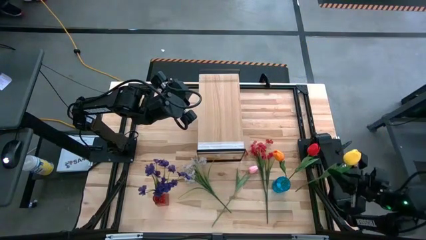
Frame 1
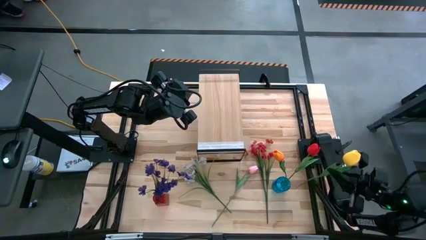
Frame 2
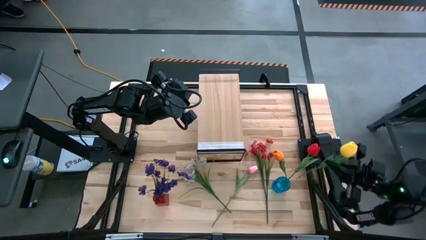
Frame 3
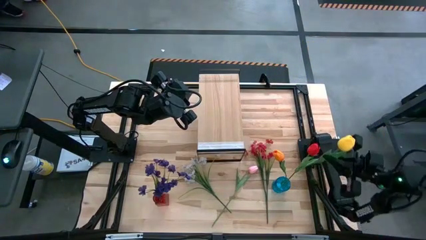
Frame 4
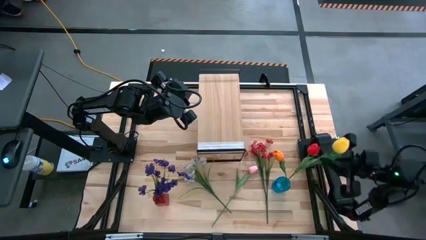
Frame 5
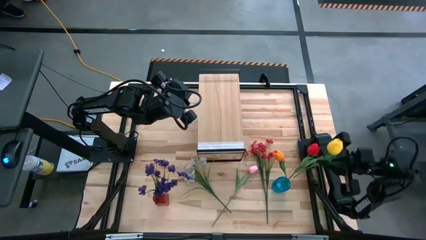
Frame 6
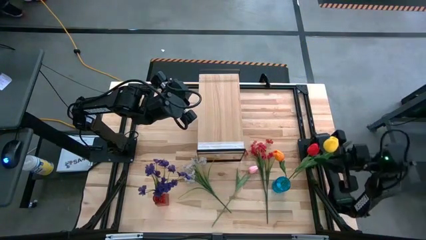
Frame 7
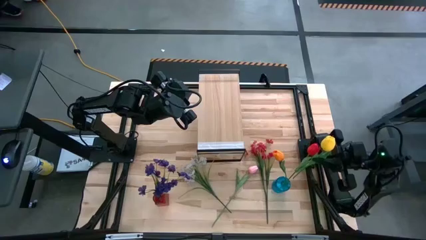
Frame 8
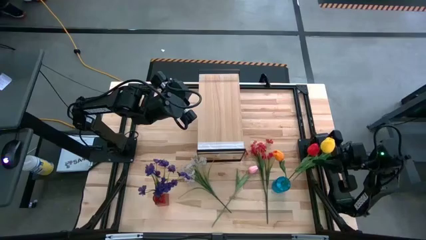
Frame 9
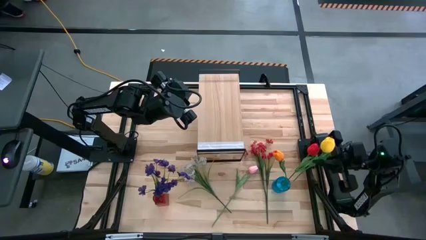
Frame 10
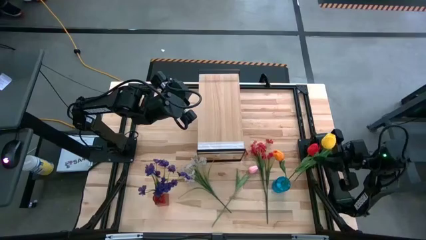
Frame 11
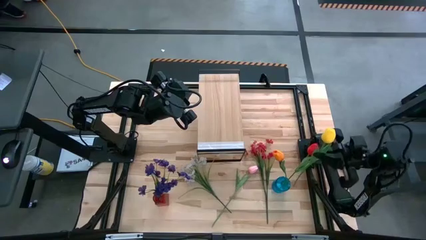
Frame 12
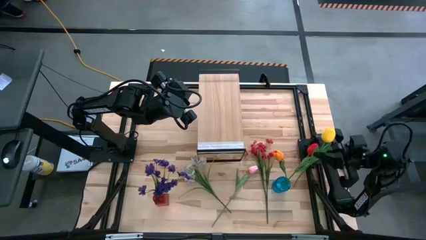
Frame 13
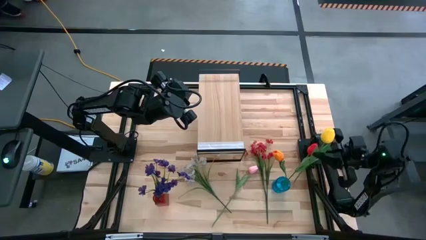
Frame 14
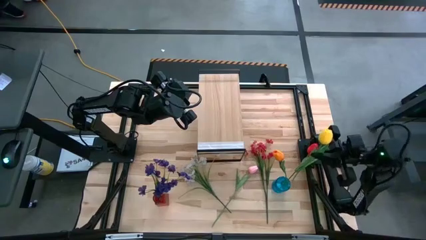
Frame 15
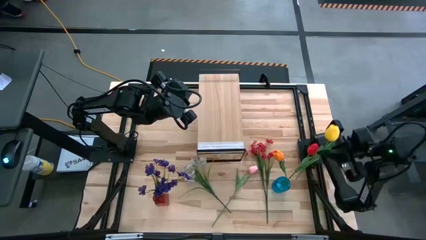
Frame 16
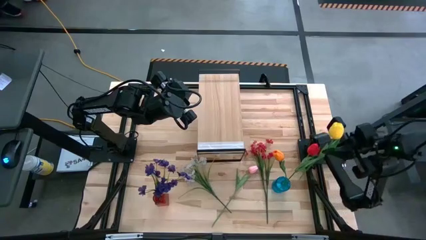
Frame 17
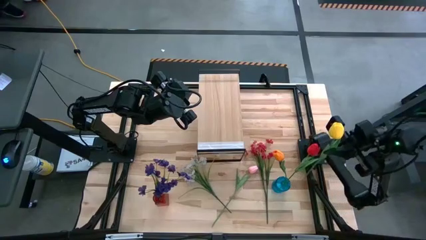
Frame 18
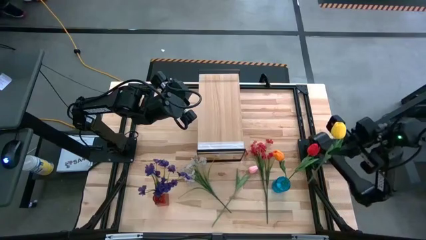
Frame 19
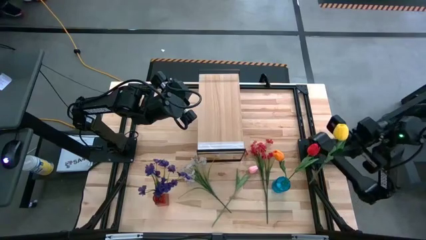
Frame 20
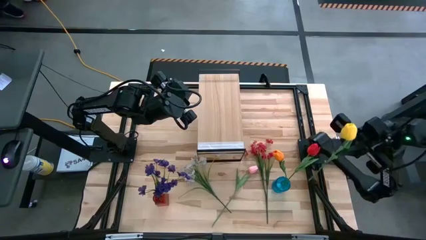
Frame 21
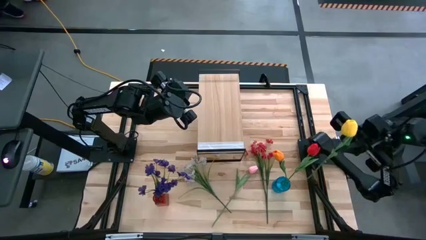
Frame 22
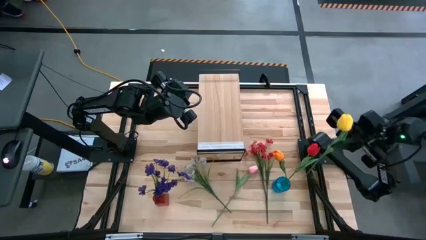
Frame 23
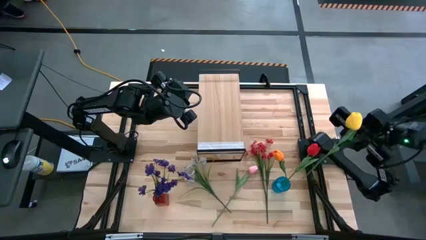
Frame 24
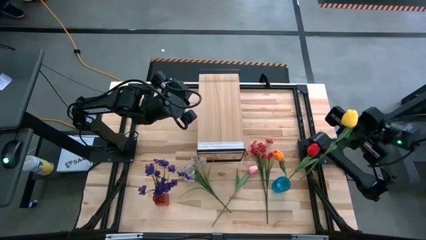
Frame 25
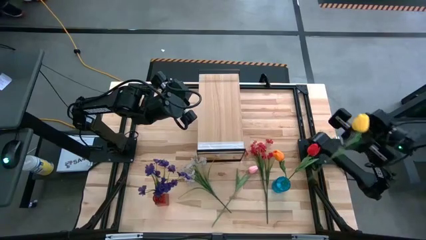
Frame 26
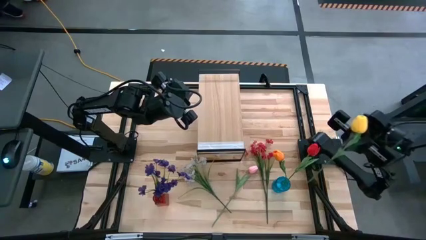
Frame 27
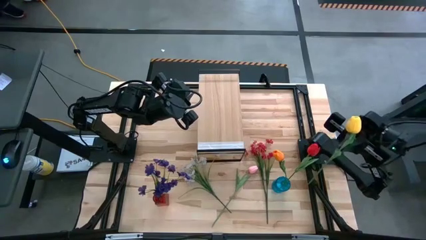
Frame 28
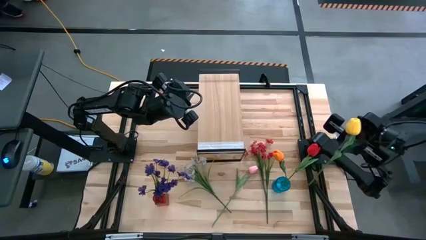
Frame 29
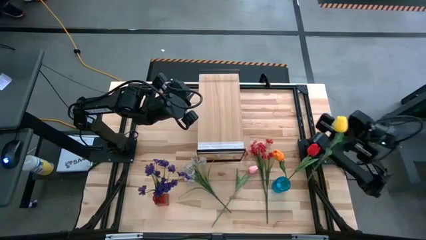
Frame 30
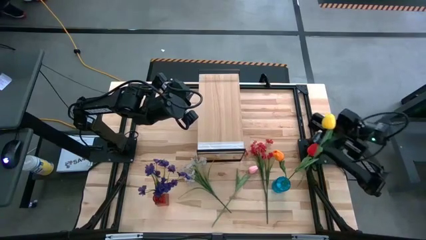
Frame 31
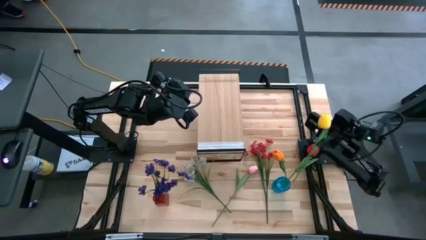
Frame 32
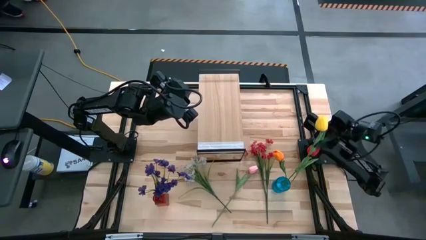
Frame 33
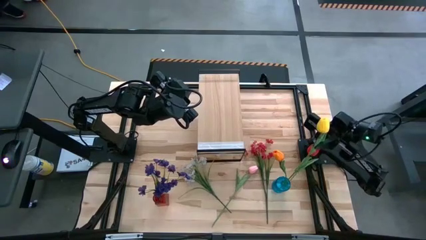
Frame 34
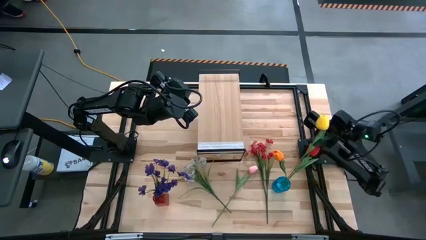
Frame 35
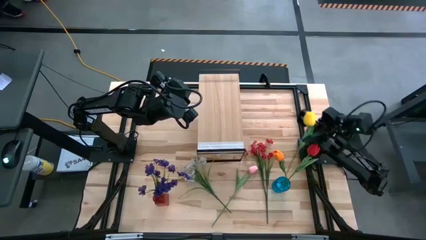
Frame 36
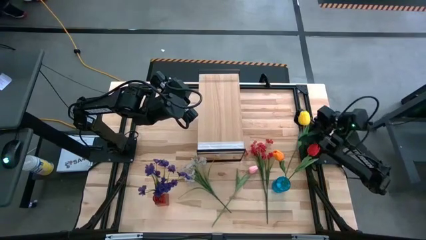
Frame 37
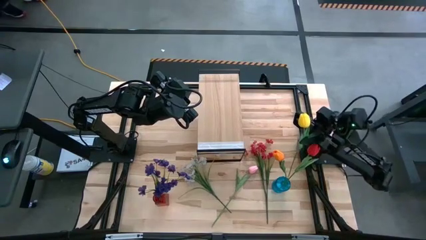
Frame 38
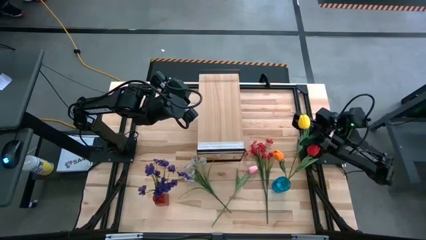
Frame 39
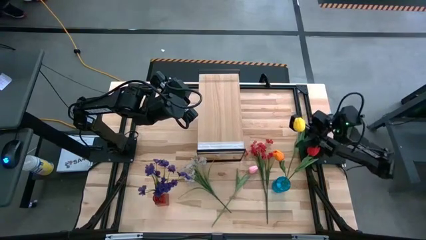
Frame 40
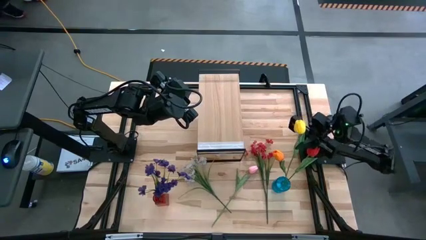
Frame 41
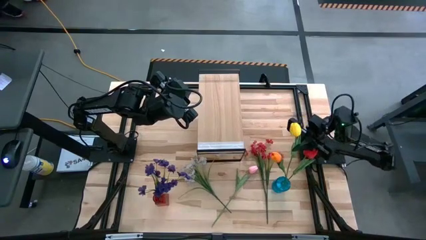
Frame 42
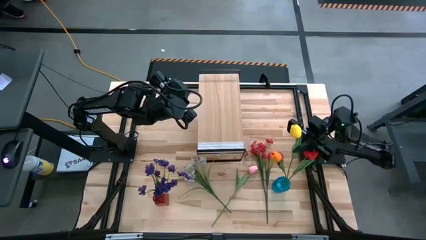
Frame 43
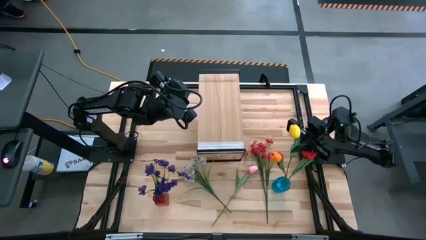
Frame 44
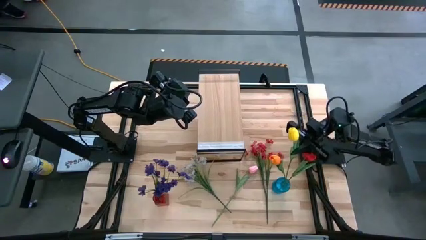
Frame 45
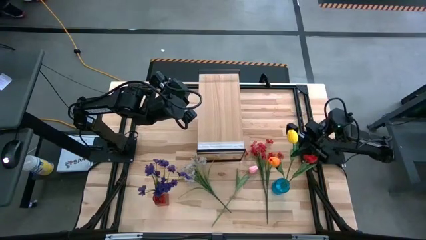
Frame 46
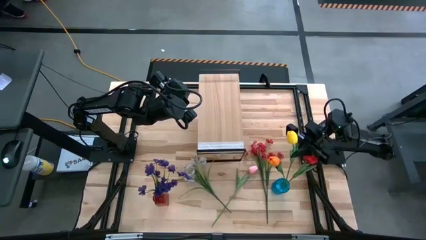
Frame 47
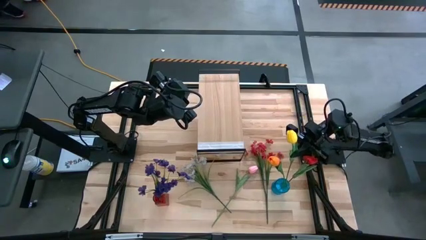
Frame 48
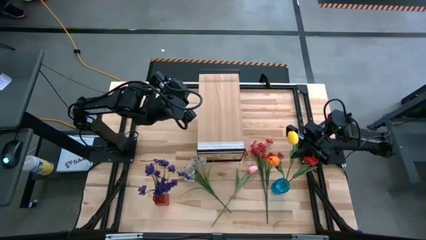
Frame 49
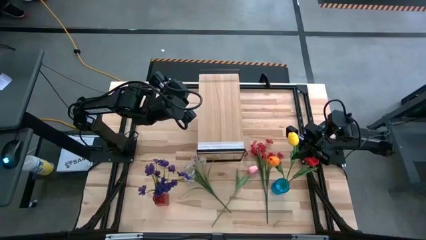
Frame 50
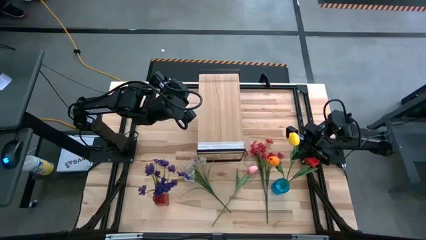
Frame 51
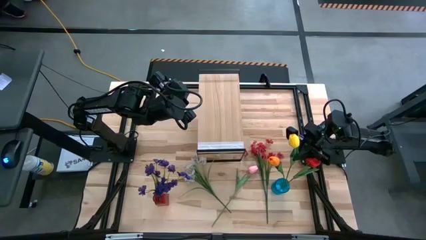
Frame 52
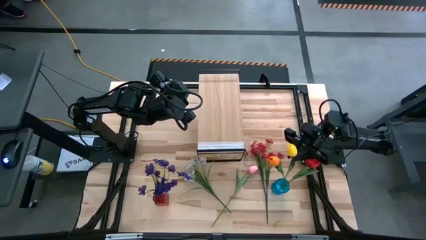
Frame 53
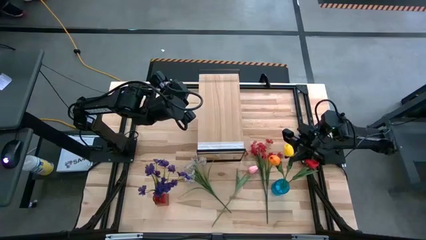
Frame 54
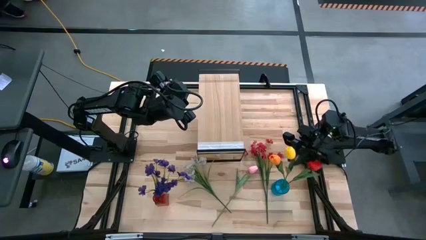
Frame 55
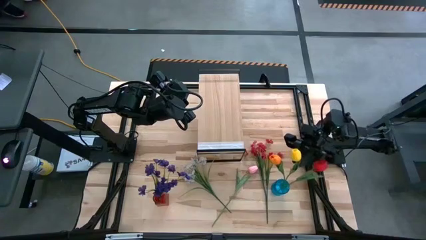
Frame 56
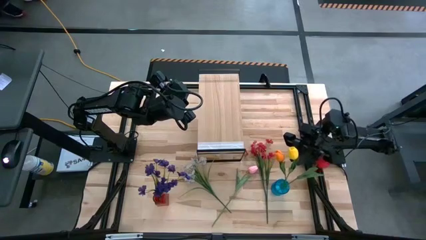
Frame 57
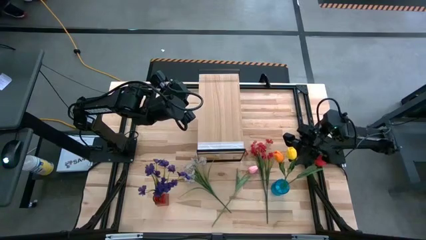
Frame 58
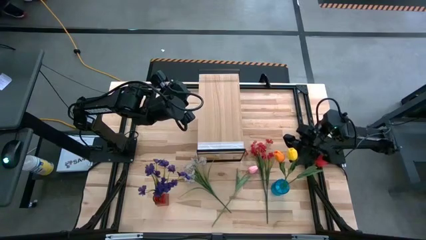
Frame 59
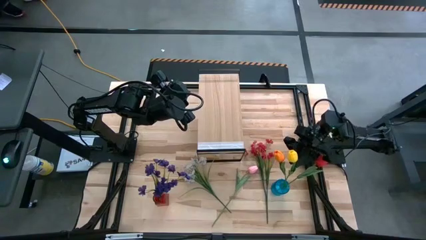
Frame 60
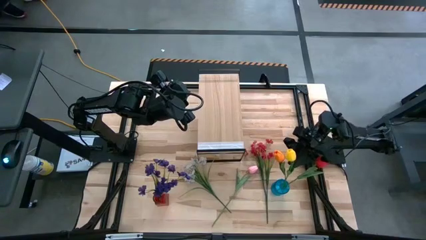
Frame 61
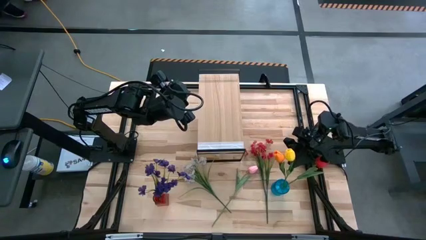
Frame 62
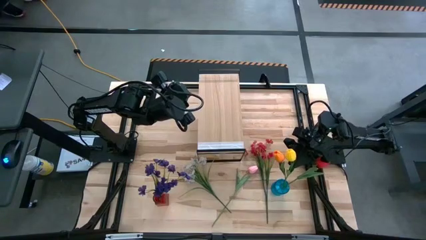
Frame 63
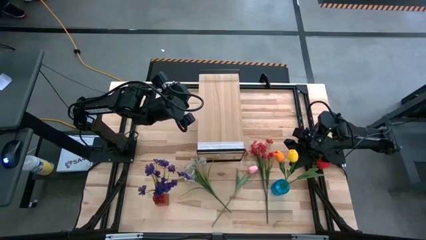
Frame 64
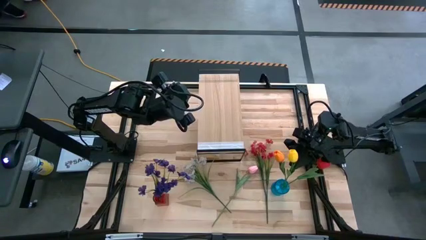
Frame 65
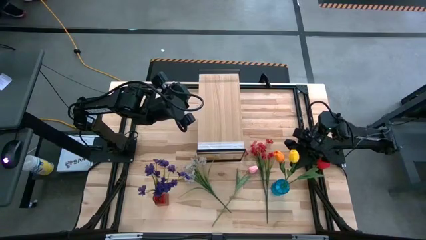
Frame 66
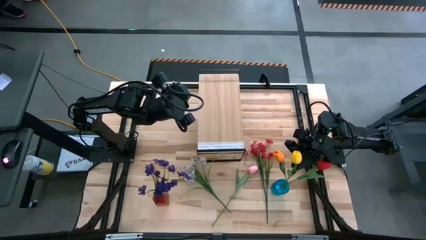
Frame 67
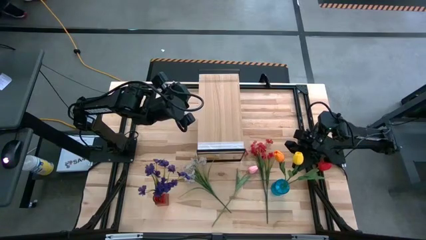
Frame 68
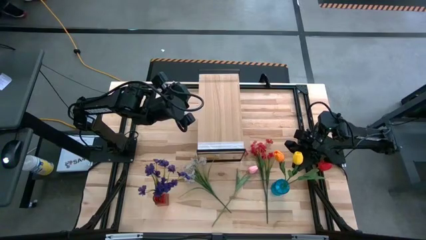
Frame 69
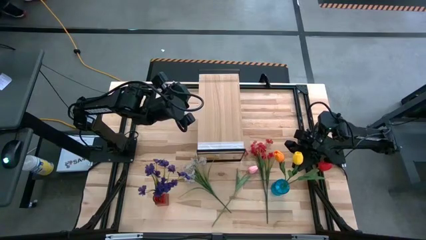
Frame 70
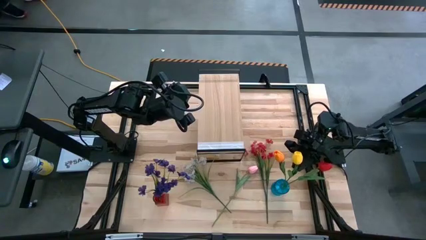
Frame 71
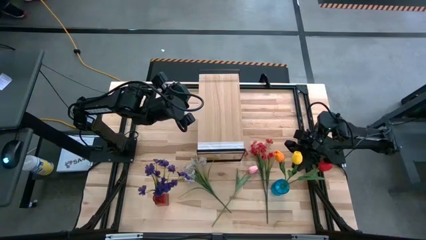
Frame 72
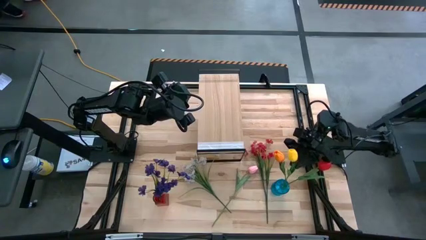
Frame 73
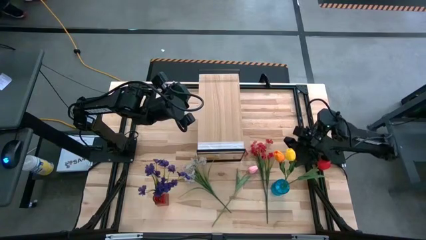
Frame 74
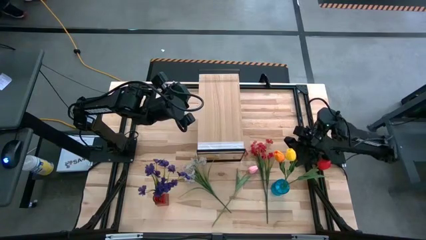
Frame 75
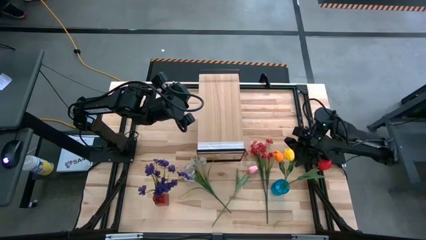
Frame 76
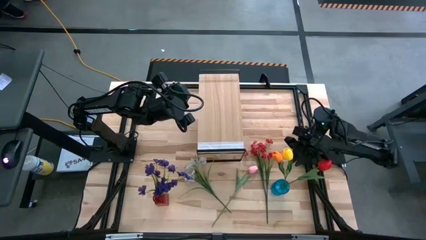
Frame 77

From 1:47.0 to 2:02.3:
Task: Pick and place flowers into a vace then onto a shelf
Put the yellow tulip into the blue vase
